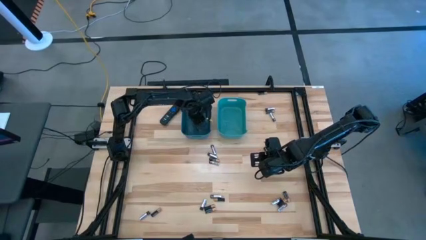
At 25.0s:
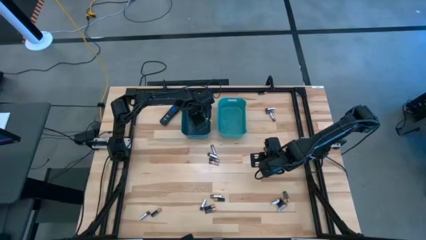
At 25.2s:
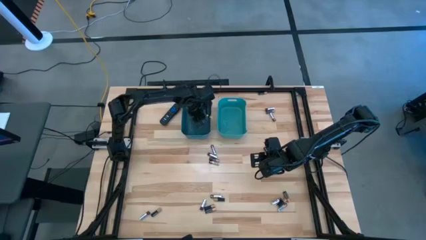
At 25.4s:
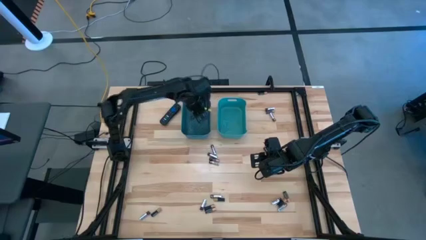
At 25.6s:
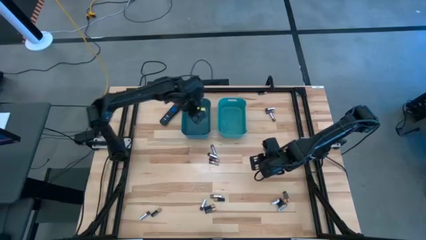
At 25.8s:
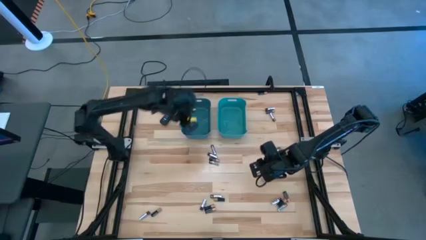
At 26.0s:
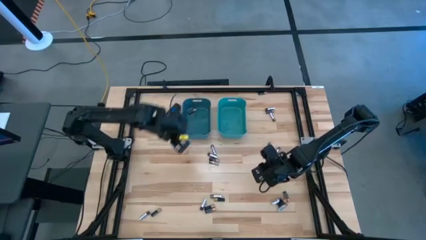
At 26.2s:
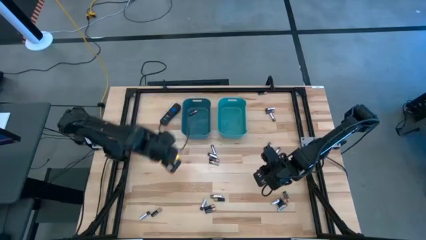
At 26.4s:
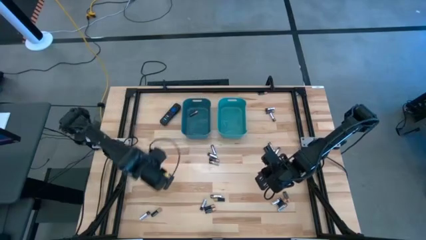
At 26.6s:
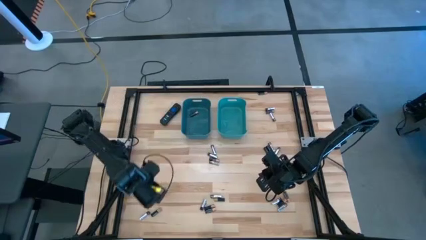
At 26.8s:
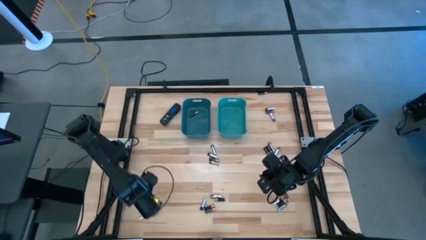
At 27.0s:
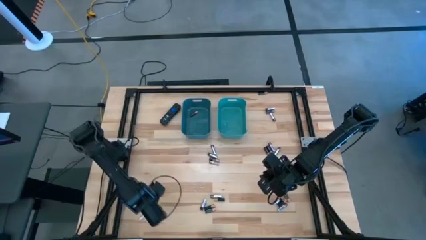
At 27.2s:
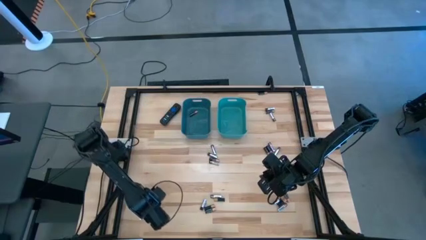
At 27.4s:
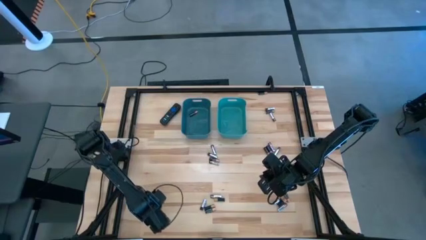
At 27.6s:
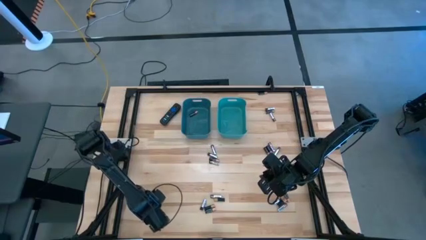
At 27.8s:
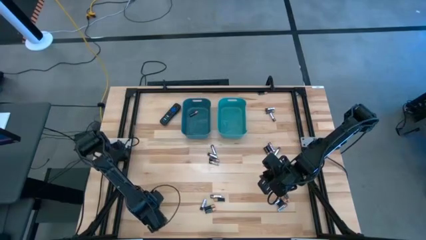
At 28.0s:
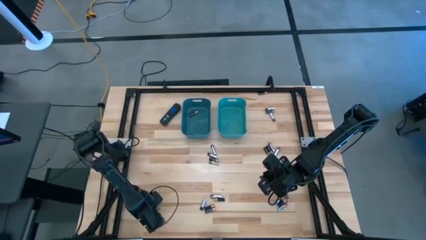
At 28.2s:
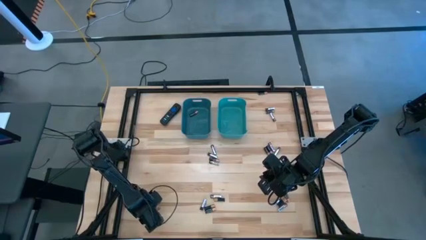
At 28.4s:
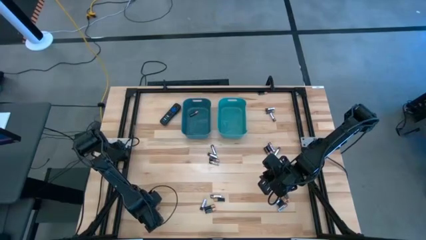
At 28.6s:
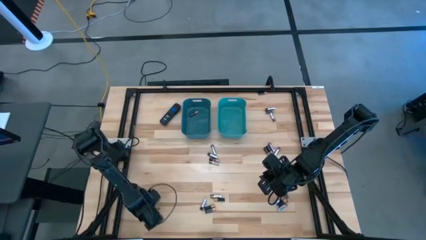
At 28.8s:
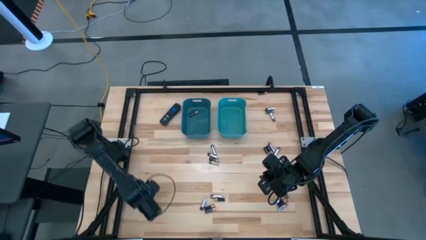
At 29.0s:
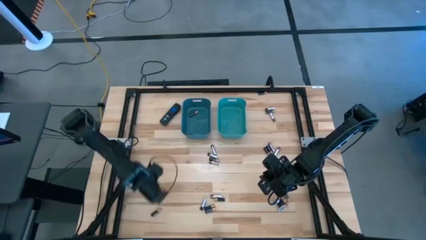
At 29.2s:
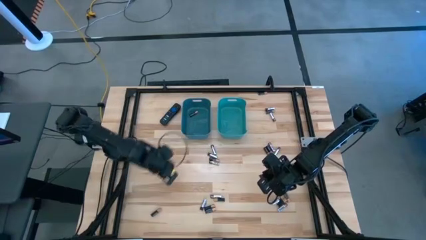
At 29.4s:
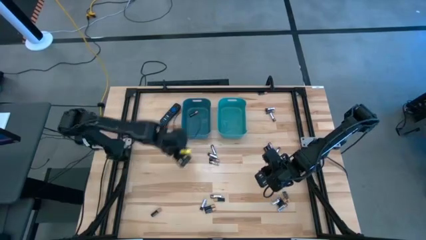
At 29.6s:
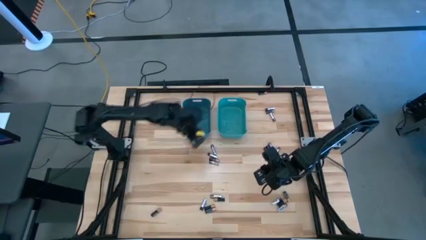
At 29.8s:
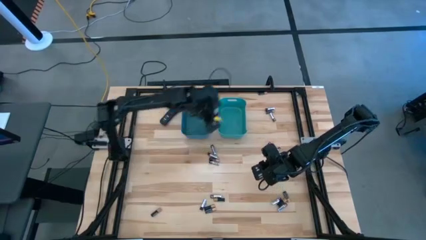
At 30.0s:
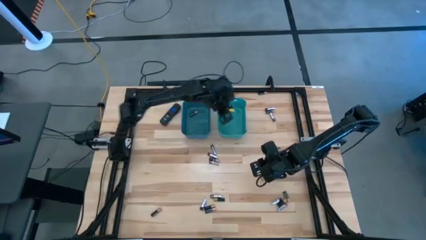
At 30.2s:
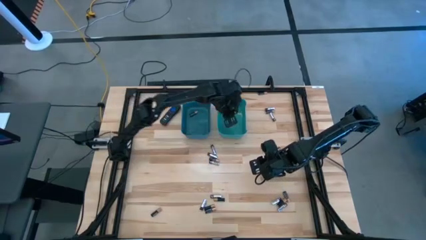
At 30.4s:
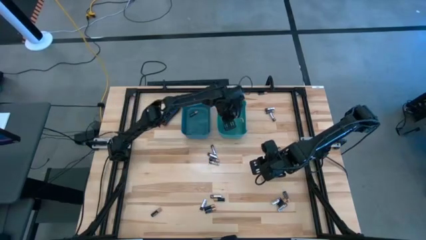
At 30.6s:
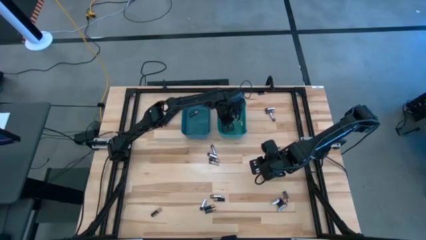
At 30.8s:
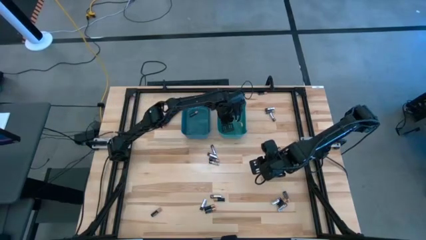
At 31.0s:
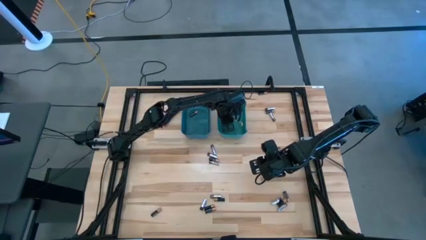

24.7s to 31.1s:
Task: Sort batteries
Put the silver battery into the green bin

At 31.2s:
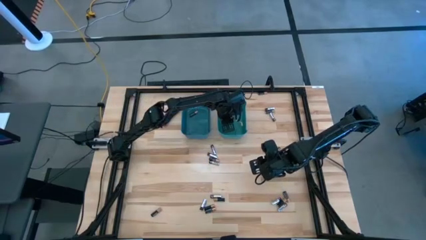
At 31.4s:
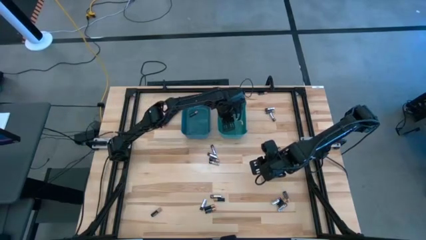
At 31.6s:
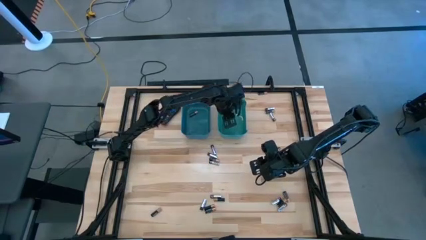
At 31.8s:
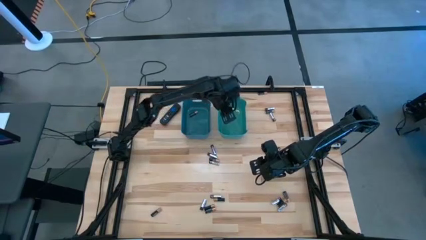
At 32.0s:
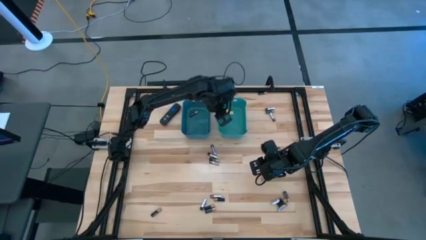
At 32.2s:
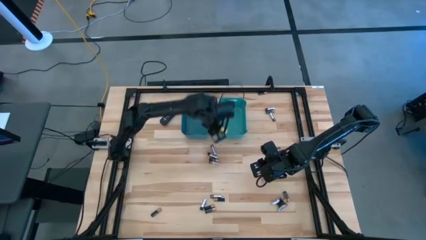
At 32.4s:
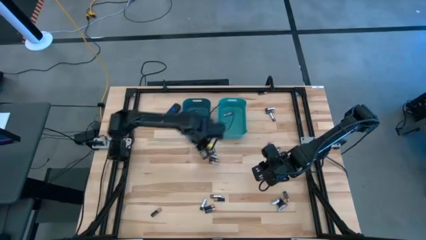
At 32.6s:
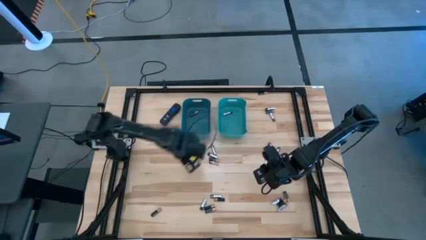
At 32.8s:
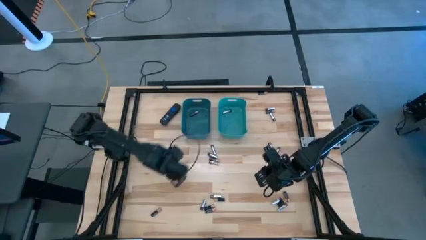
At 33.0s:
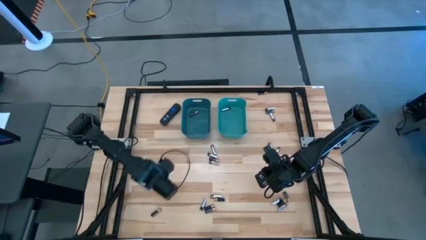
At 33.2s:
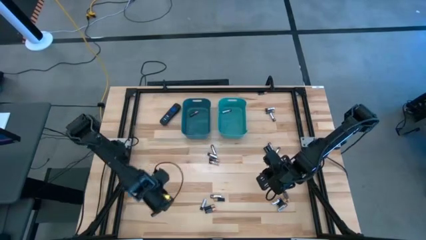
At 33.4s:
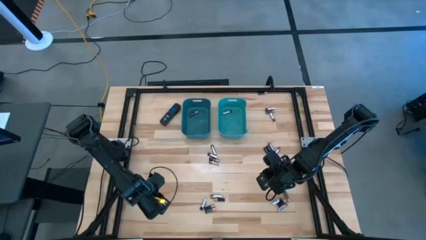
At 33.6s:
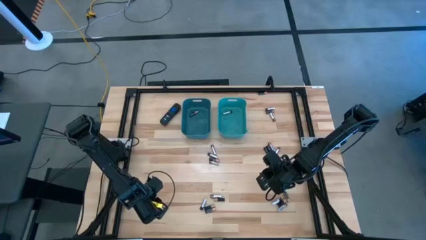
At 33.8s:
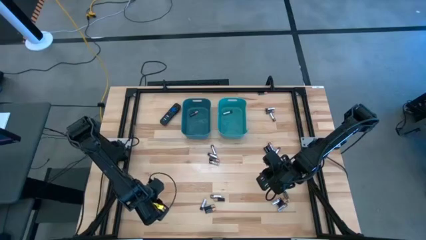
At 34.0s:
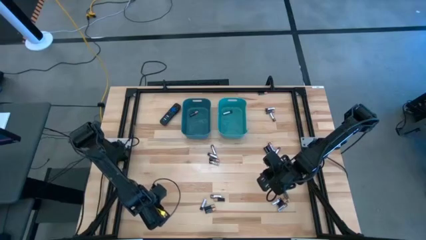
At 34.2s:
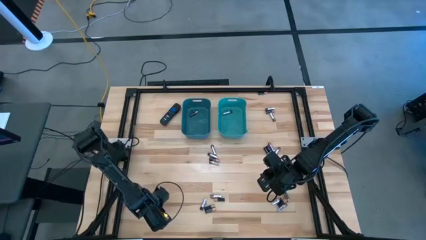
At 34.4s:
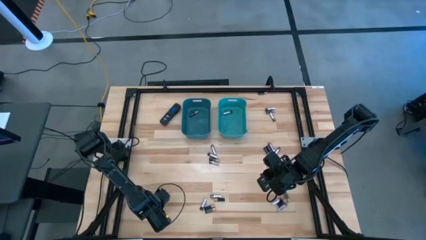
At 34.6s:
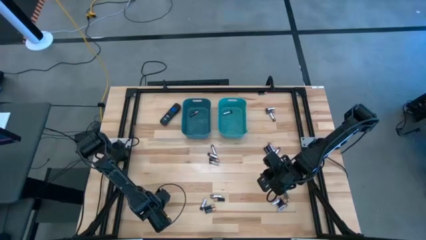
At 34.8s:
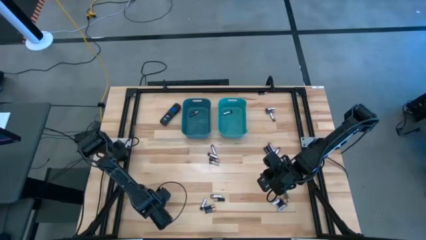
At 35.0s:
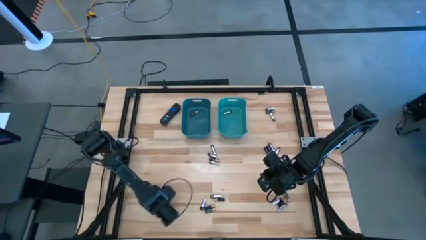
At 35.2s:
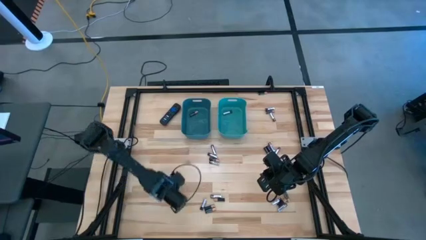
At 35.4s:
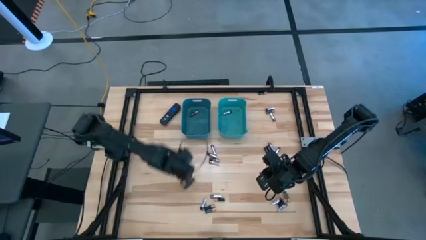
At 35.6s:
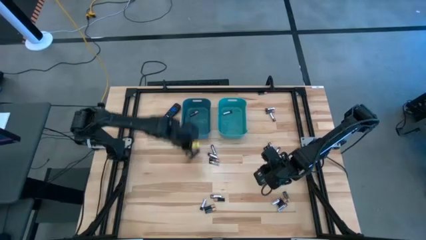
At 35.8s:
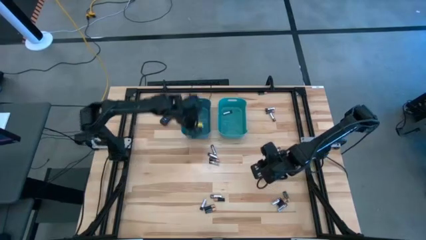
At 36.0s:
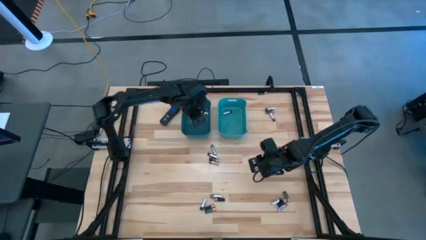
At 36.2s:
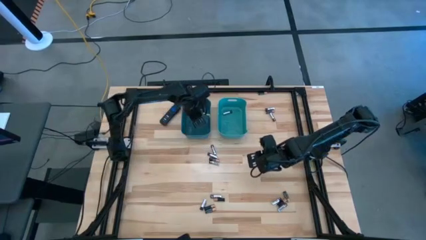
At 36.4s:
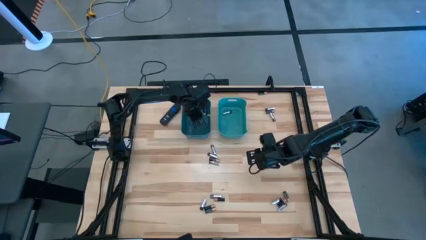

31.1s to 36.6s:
Put the black battery into the blue bin

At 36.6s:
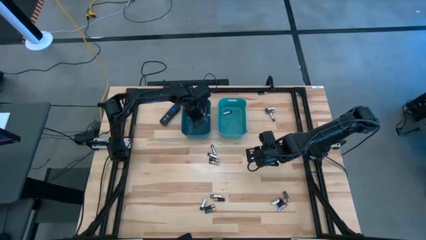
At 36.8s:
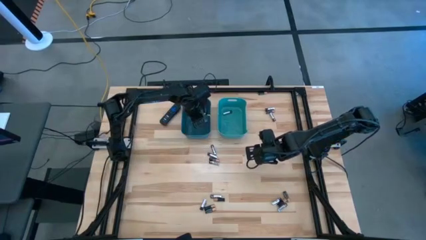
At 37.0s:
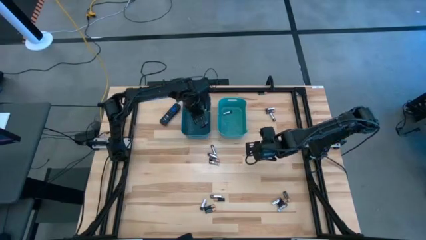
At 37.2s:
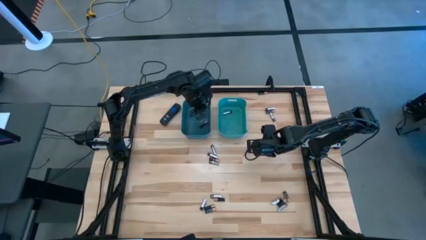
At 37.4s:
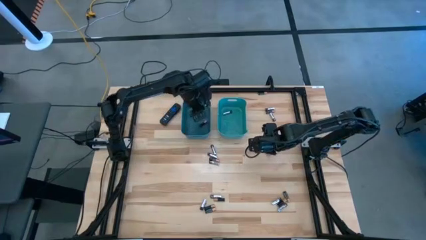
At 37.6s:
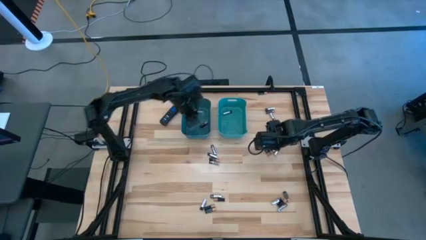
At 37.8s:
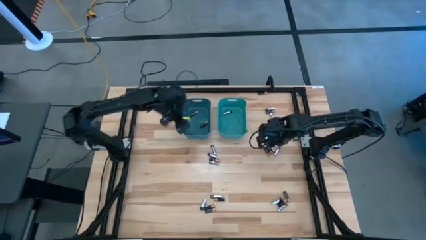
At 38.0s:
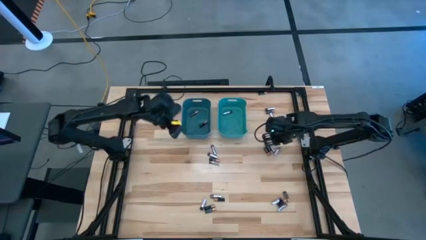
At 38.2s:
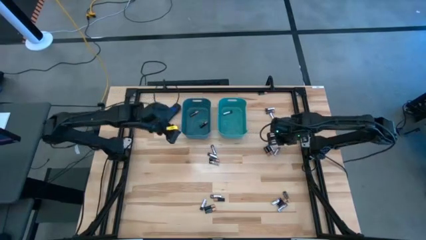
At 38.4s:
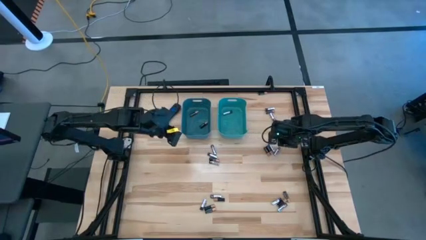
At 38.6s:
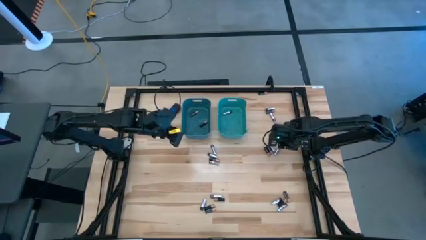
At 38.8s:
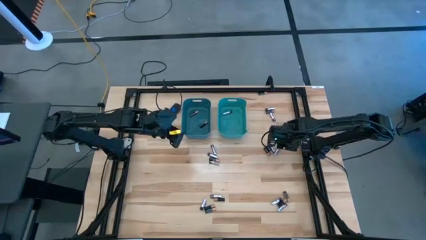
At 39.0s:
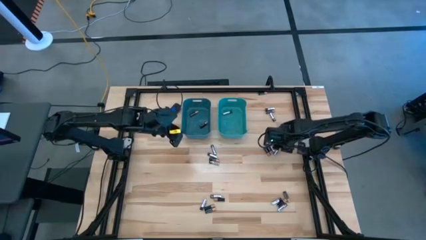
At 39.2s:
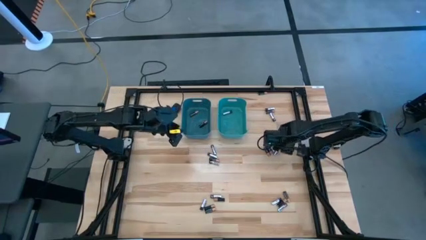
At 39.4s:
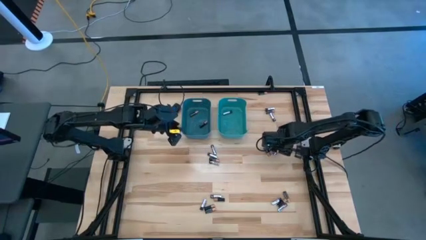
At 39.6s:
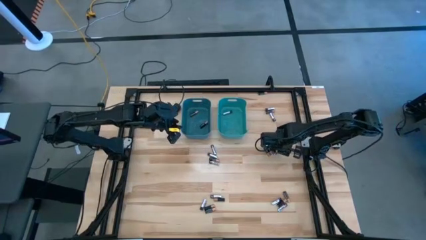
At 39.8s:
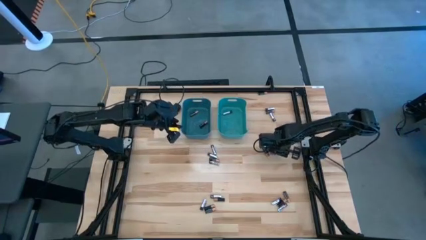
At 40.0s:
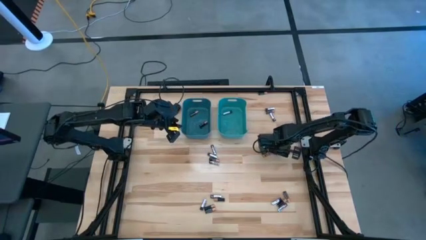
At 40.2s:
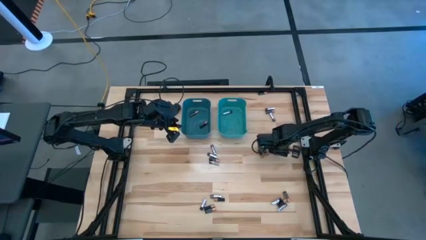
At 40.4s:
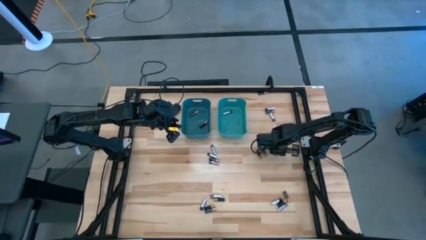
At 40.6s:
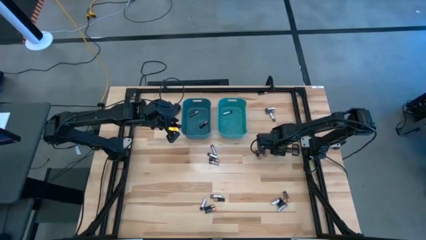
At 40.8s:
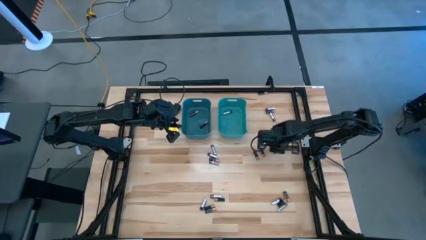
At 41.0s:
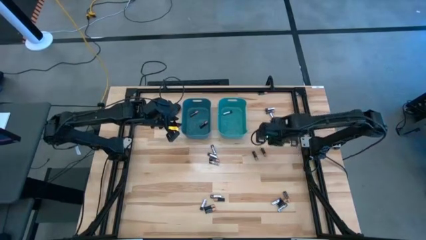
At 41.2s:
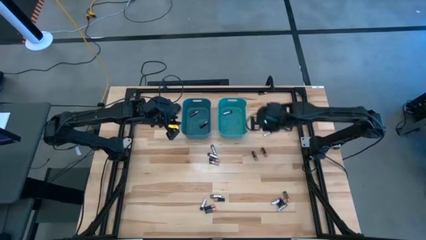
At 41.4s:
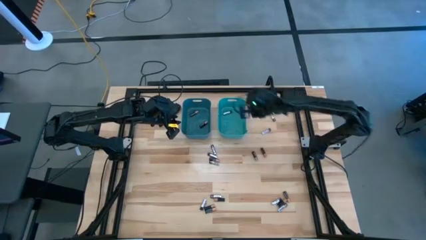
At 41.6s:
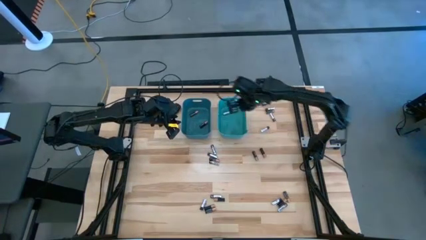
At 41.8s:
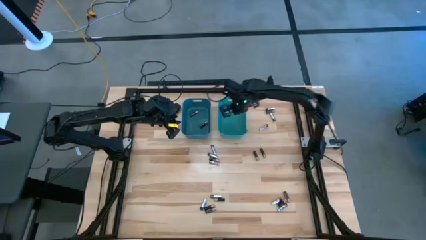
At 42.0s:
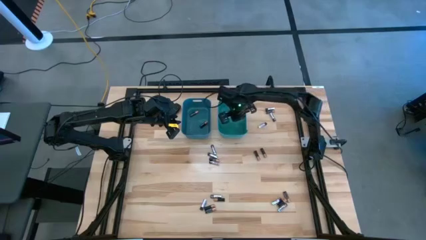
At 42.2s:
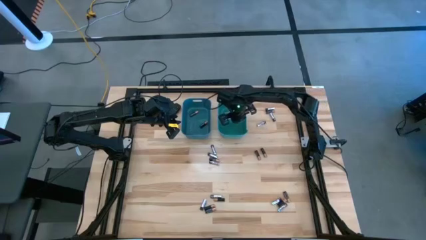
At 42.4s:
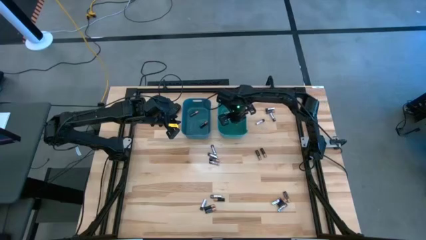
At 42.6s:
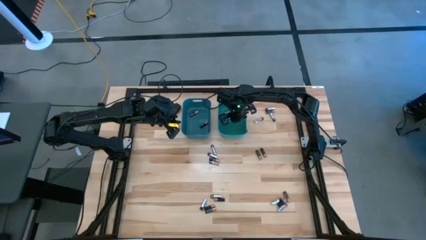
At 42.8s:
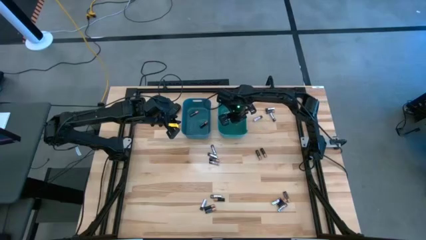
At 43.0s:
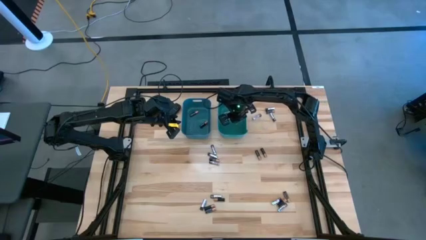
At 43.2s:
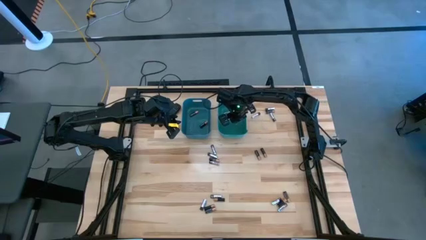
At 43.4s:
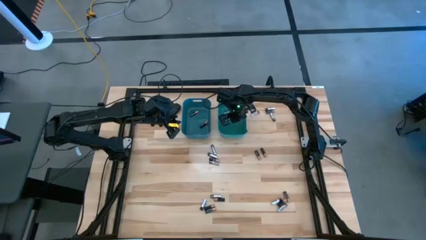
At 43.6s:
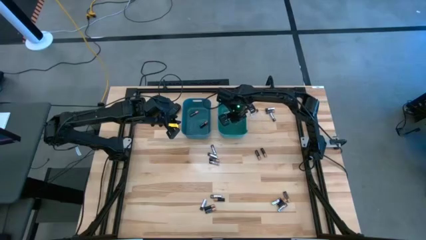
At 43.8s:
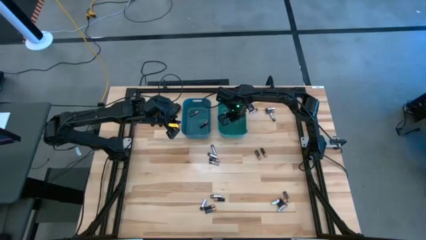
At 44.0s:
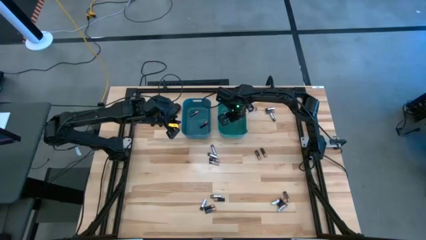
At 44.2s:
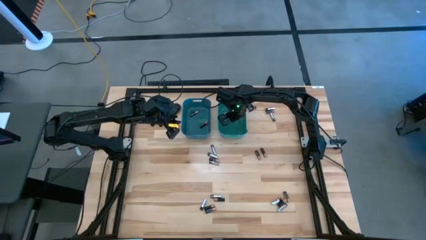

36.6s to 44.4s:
Put the silver battery into the green bin
